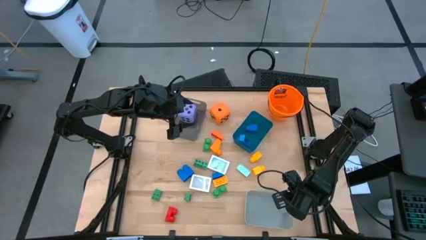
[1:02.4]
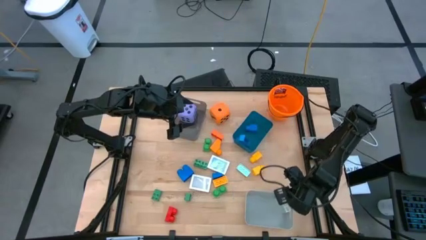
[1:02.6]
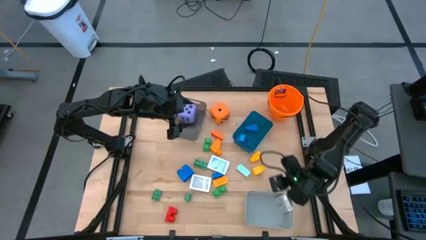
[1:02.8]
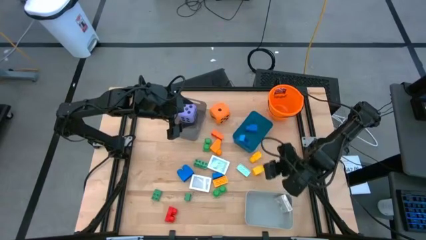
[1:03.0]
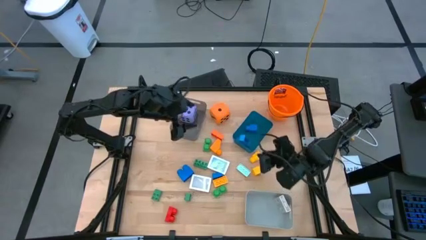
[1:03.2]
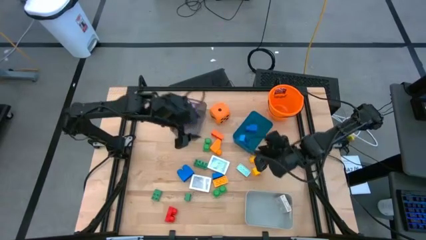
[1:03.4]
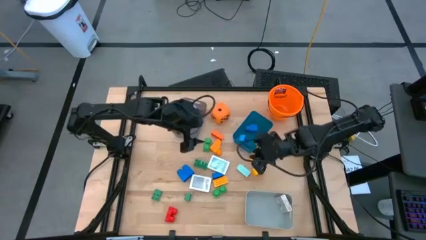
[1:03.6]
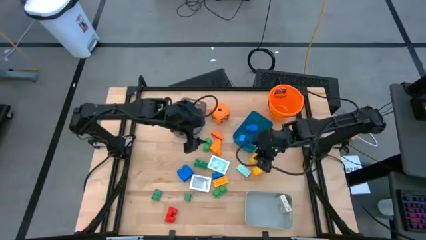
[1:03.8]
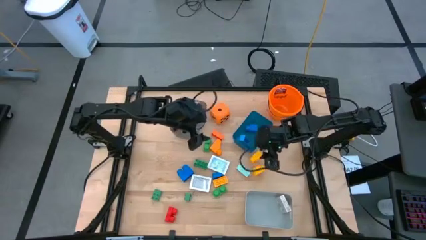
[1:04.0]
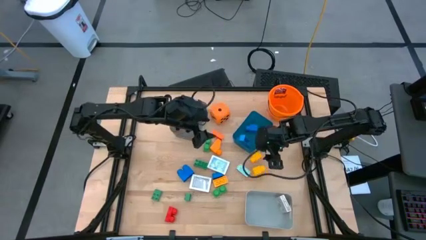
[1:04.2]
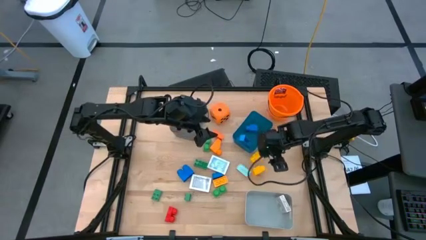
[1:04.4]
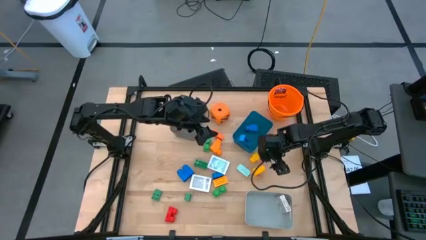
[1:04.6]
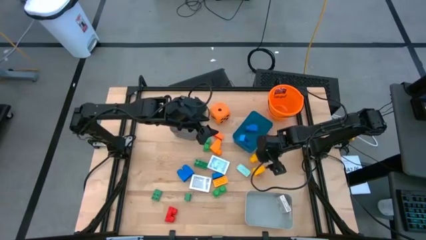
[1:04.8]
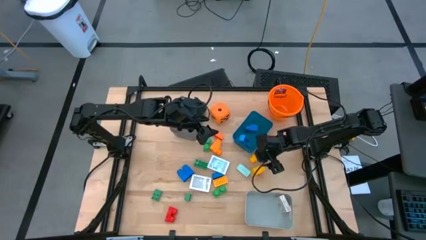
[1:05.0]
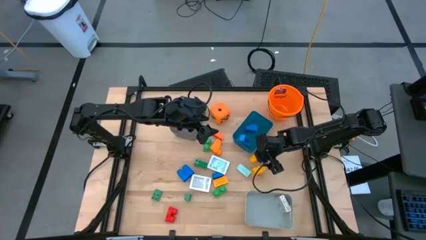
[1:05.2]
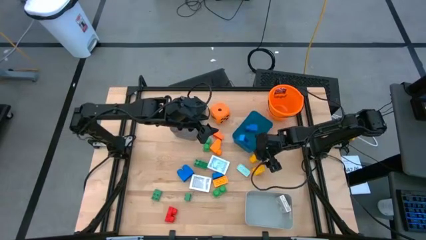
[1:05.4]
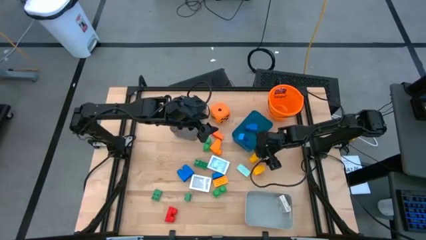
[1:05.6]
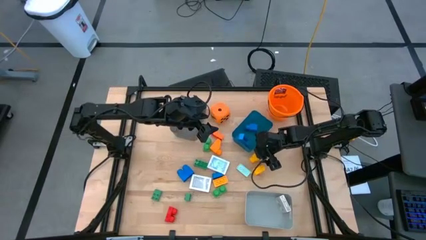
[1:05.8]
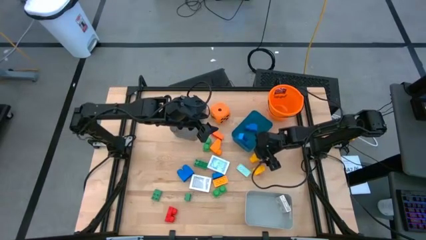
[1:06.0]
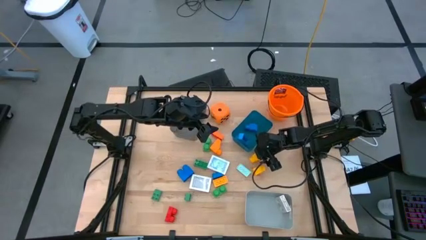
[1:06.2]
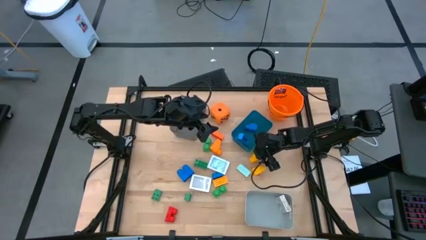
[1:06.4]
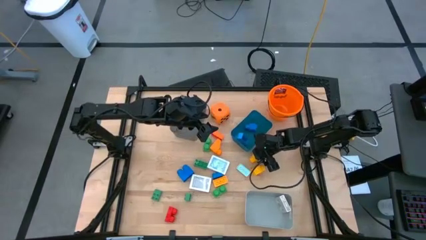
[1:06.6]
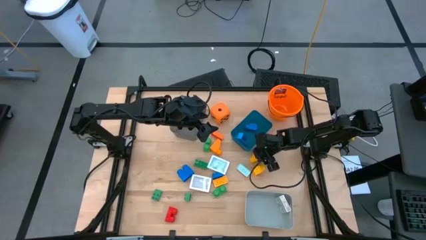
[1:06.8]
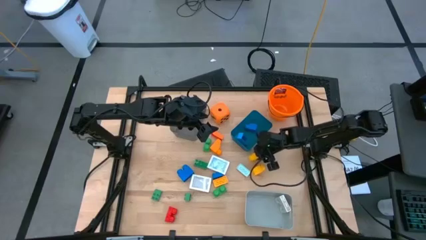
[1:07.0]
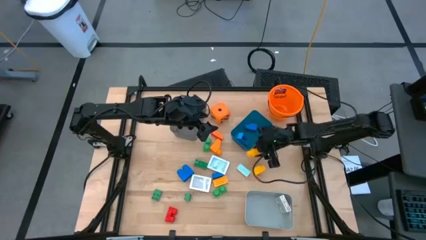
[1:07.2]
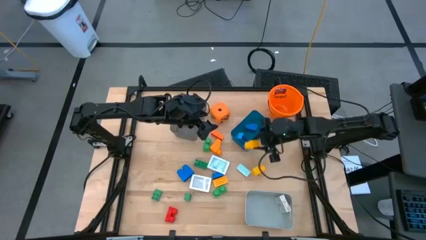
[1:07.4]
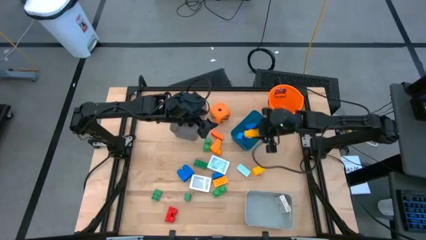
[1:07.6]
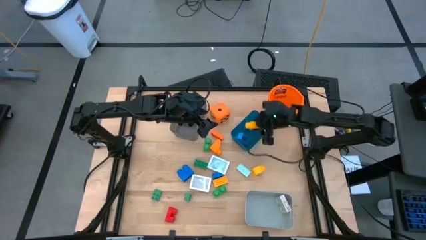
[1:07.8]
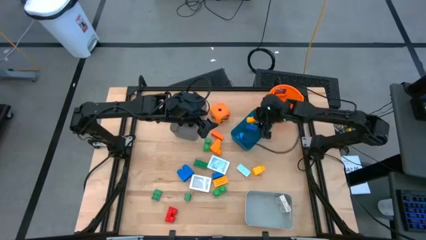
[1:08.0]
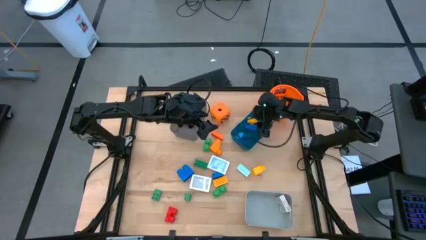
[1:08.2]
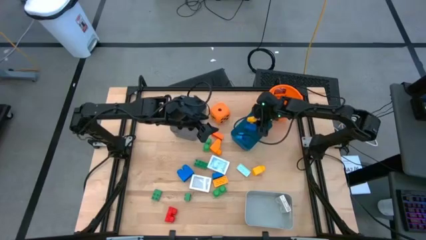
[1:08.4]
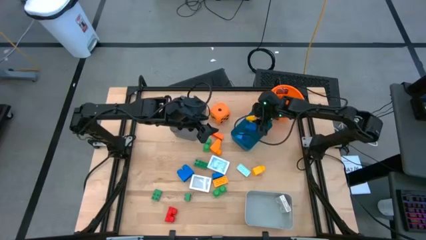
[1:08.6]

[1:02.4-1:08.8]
Task: Pick & Place Toys
Put the top right yellow game piece into the blue bin

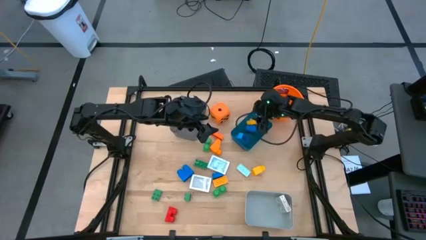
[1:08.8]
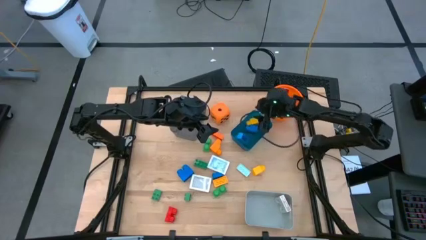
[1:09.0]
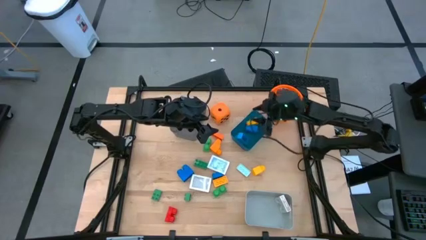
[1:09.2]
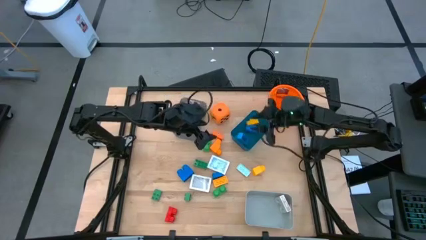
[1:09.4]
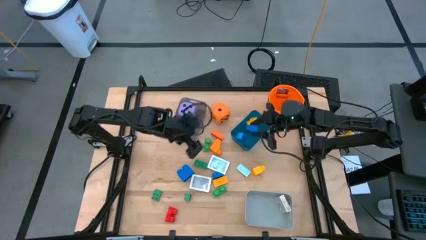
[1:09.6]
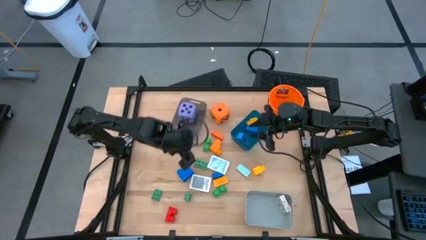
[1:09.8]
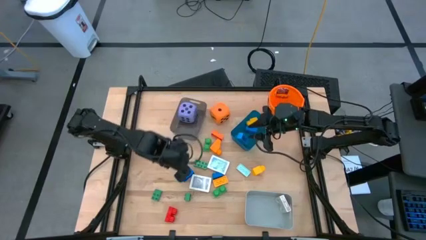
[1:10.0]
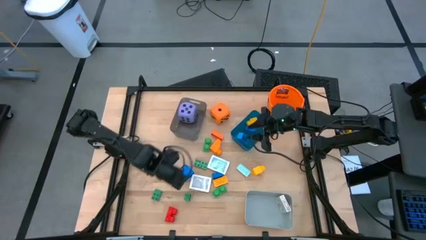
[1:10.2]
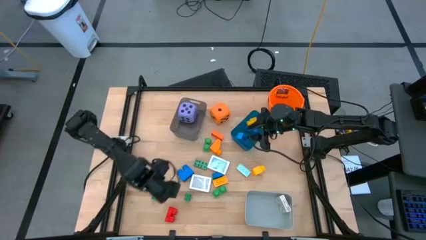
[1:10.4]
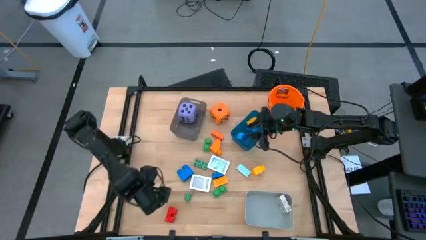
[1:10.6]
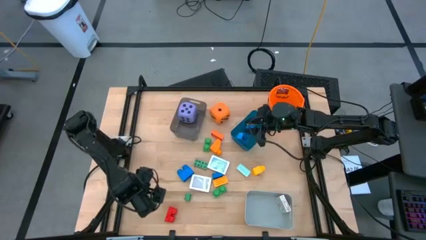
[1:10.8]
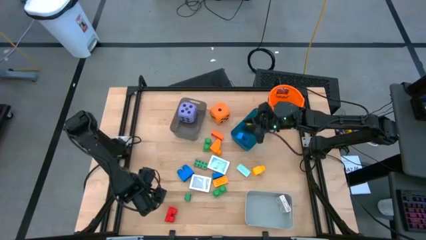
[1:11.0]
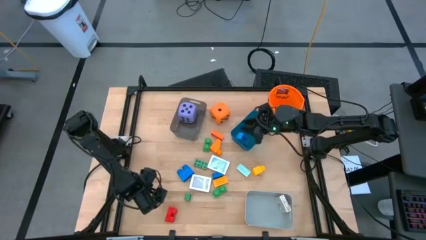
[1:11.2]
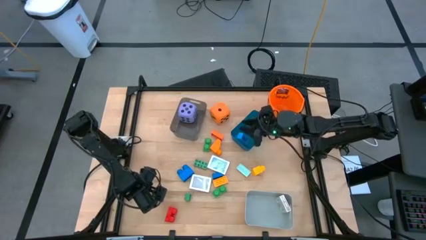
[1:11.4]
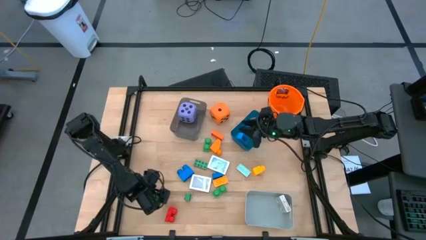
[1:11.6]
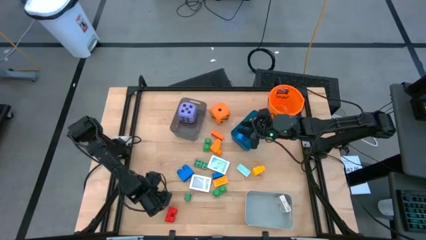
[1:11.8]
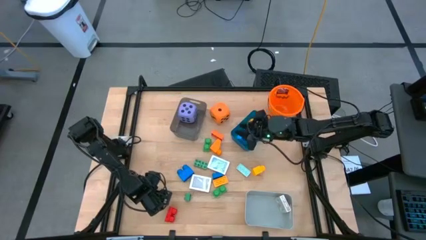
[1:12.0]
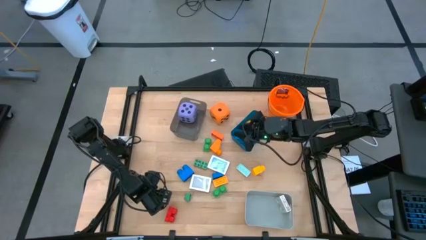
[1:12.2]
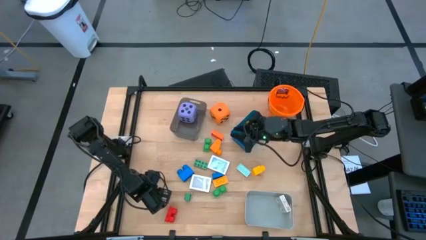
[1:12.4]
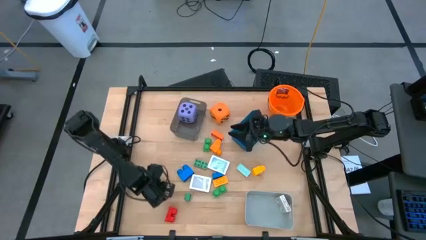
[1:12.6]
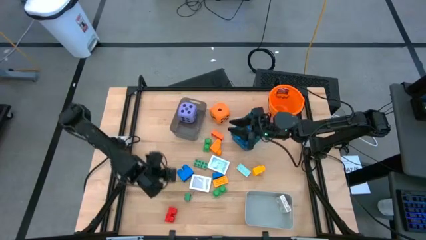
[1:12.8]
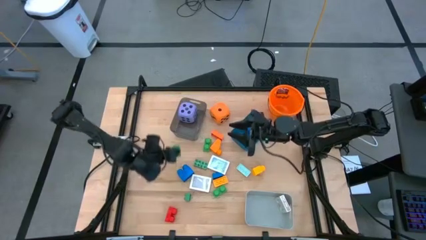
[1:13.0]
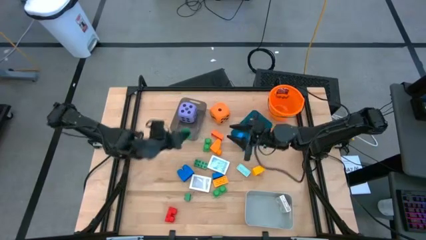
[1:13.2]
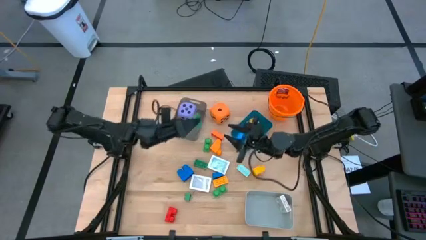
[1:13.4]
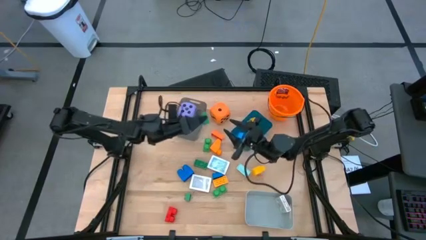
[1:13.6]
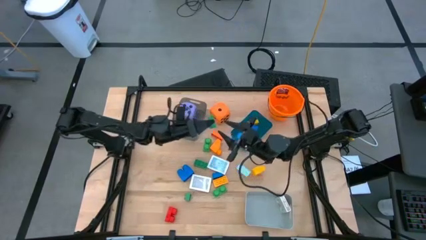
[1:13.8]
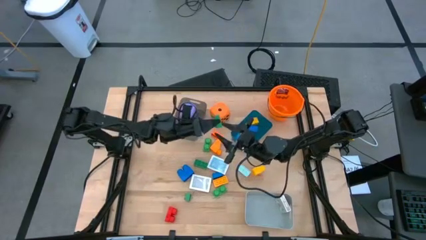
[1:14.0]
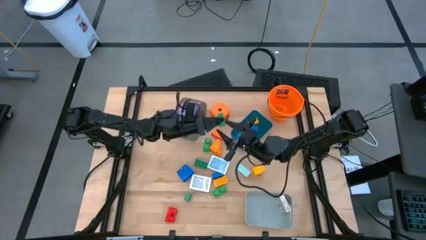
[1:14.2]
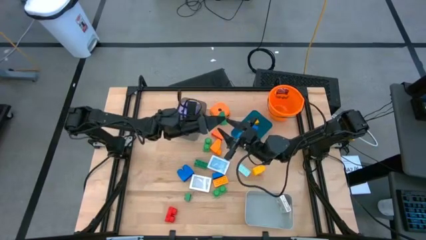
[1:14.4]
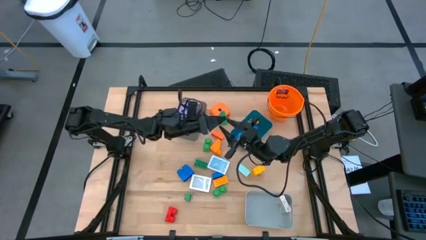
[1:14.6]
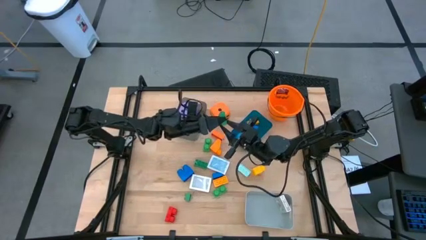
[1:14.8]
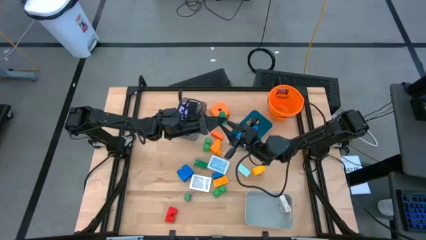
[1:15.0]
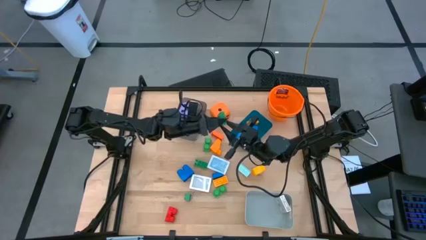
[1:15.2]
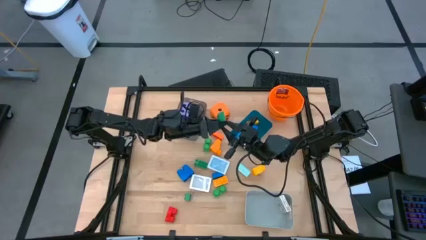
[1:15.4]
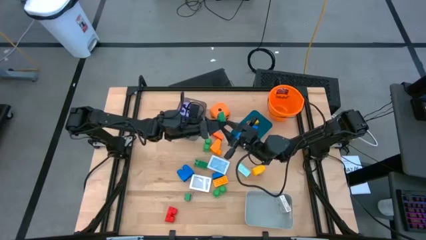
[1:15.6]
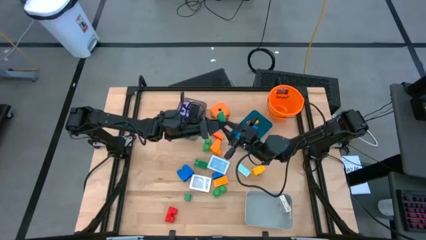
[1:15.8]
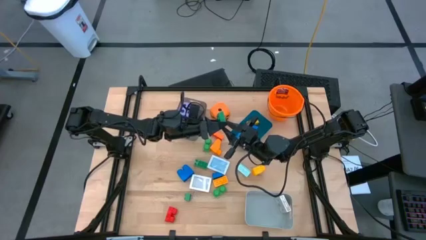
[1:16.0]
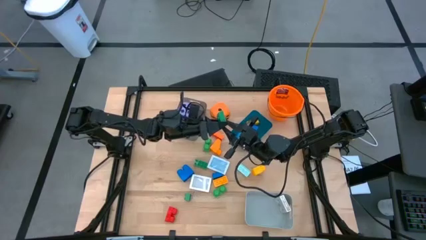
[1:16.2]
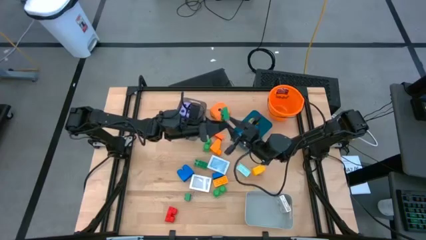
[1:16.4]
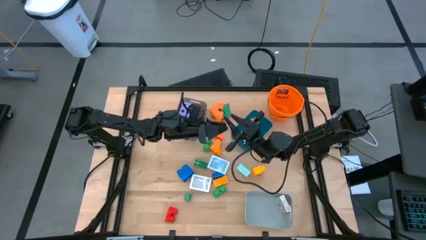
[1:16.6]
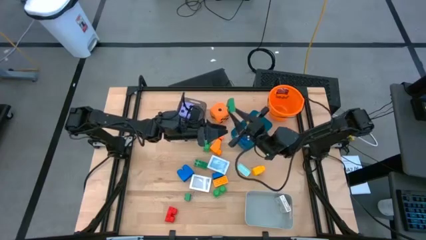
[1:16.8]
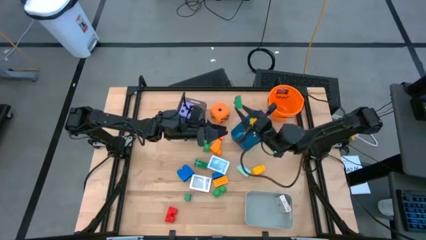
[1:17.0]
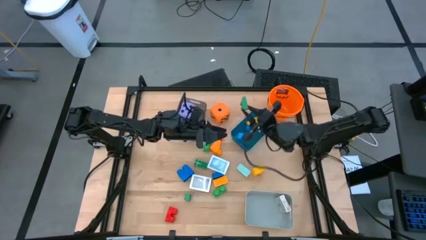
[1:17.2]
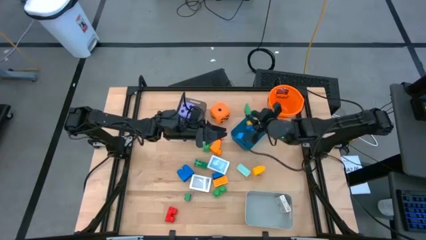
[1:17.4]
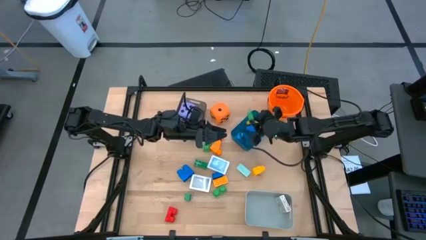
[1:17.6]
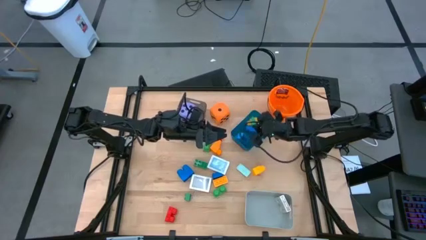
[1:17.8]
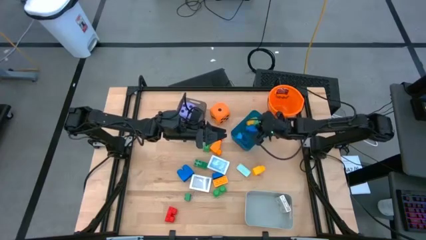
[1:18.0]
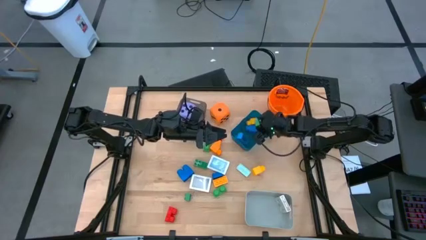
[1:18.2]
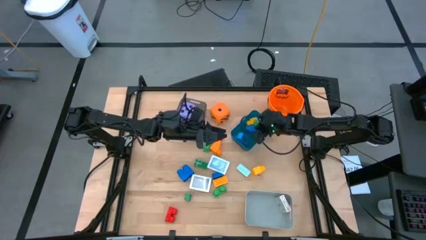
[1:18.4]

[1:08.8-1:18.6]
Put the green game piece into the blue bin
